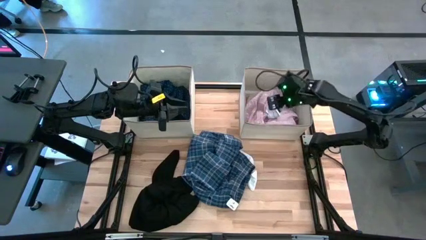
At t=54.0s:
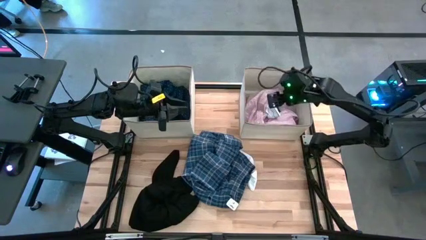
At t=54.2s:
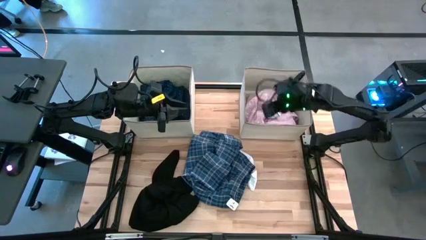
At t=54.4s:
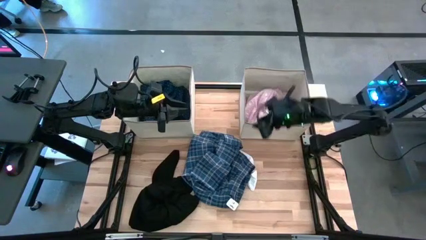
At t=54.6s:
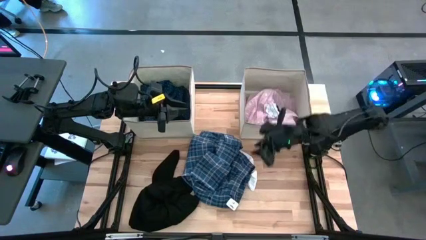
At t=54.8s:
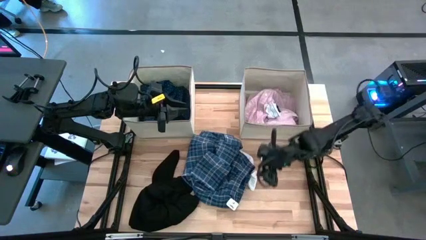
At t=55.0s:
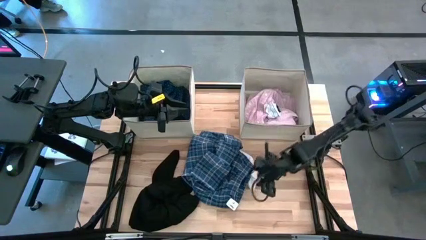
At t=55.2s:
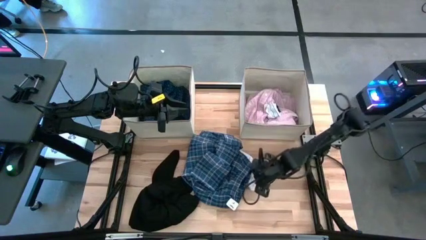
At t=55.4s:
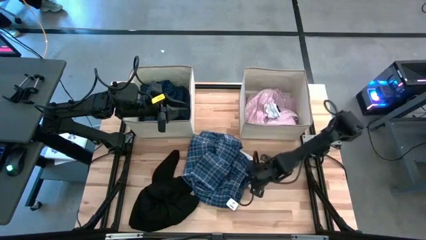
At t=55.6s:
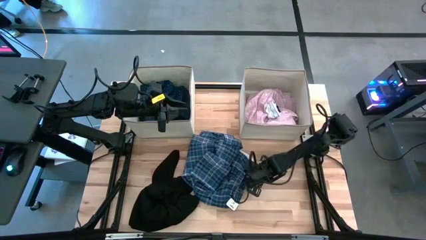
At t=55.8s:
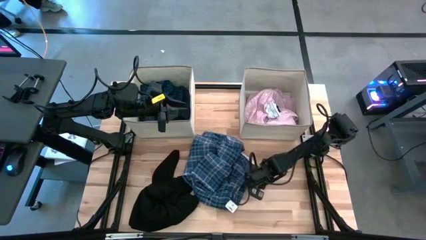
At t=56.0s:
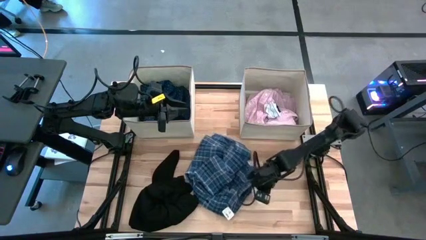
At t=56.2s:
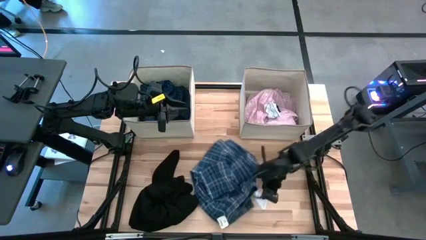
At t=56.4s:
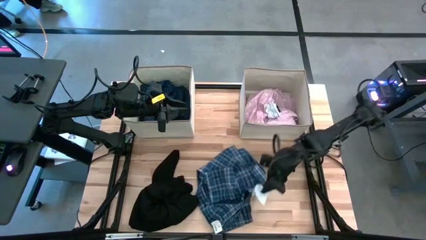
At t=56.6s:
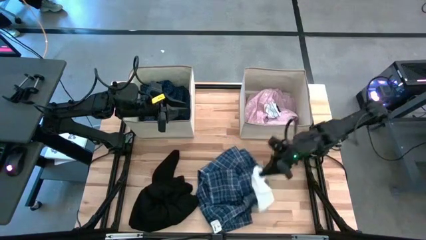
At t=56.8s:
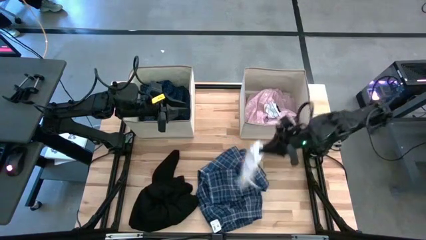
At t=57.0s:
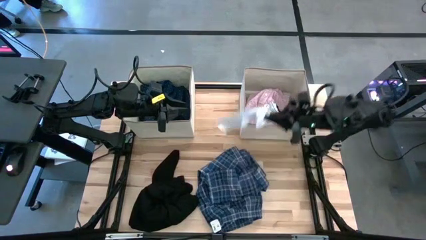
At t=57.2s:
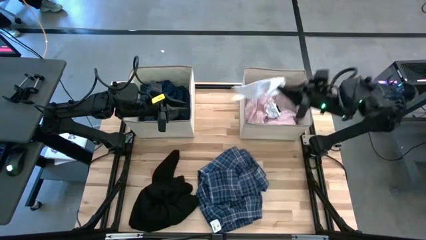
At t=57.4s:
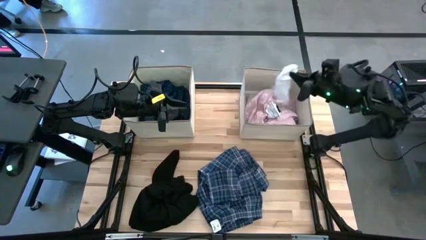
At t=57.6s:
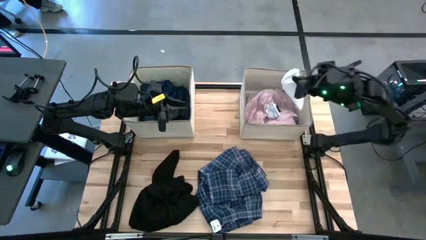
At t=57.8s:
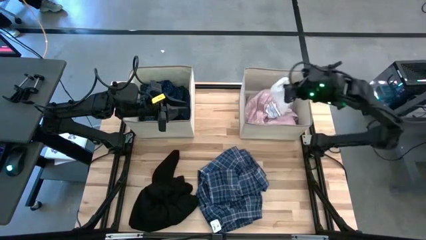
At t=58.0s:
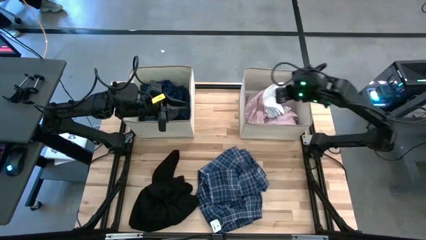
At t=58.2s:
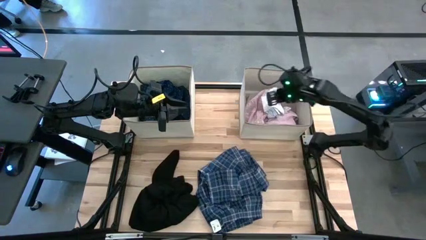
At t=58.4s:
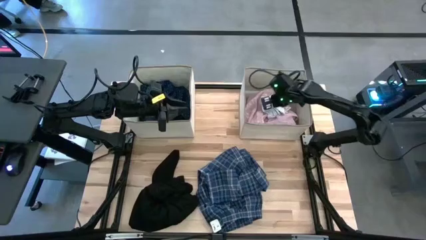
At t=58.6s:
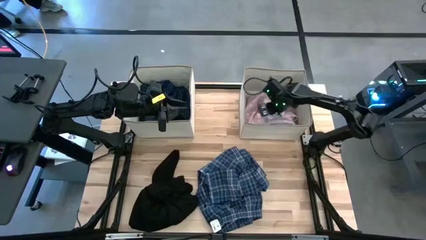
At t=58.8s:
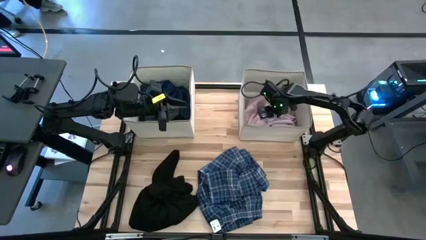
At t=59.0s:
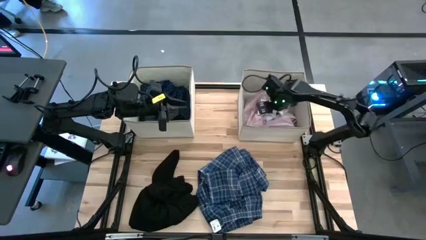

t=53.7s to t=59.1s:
Task: Sort clothes
Put the white sock into the right laundry bin

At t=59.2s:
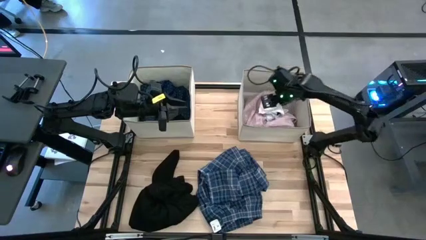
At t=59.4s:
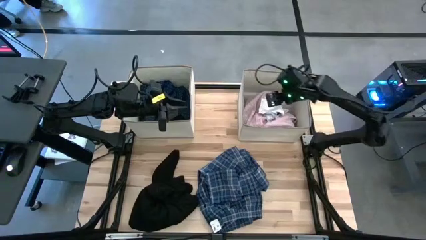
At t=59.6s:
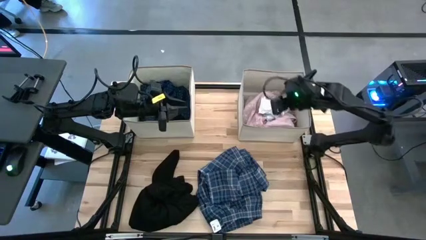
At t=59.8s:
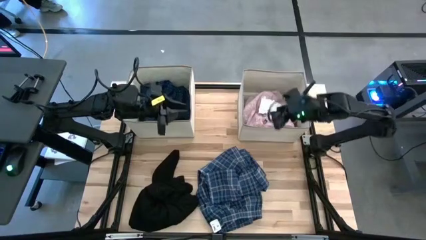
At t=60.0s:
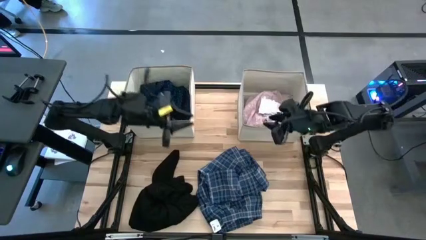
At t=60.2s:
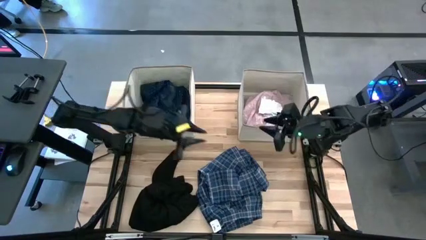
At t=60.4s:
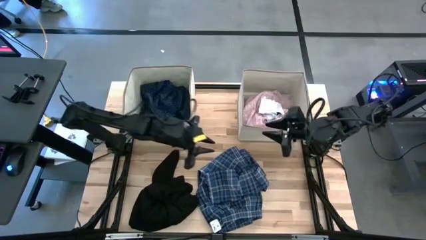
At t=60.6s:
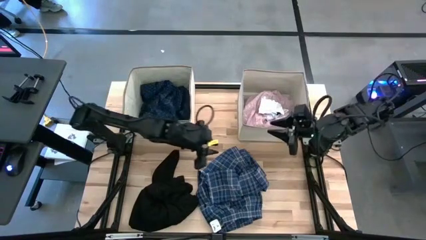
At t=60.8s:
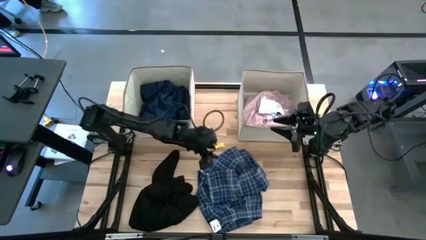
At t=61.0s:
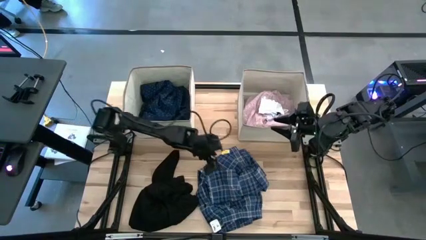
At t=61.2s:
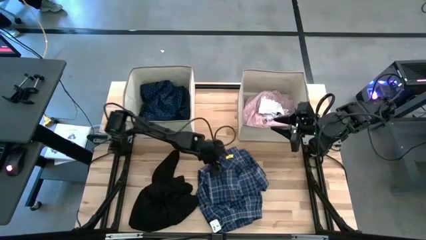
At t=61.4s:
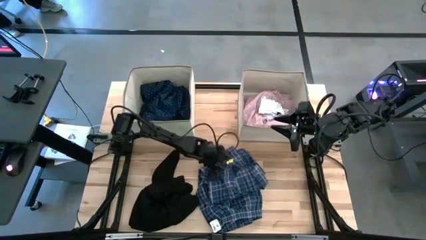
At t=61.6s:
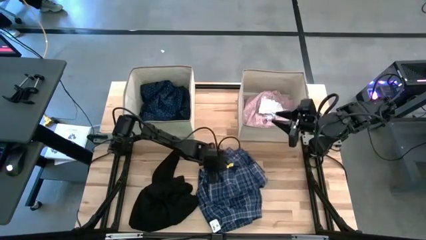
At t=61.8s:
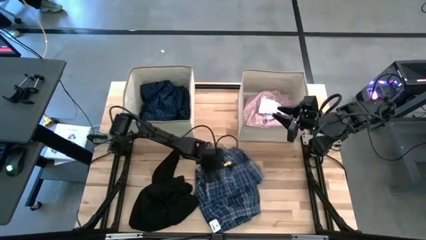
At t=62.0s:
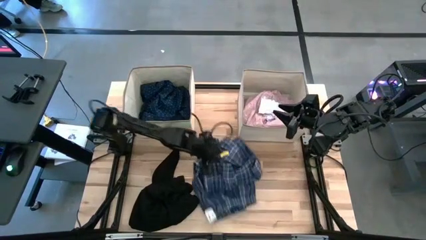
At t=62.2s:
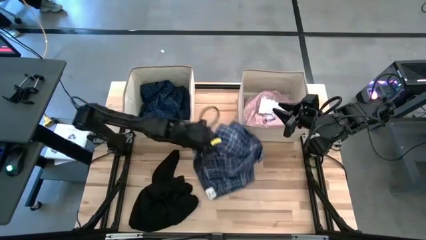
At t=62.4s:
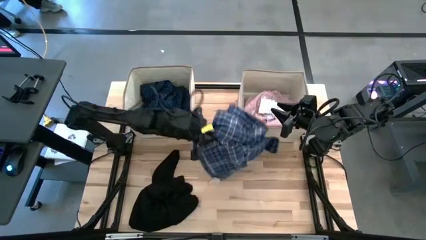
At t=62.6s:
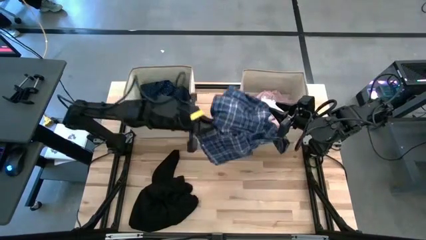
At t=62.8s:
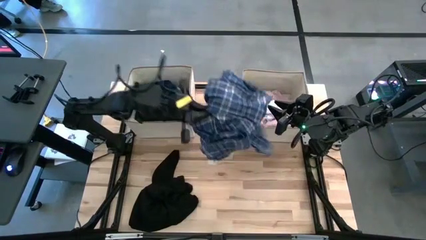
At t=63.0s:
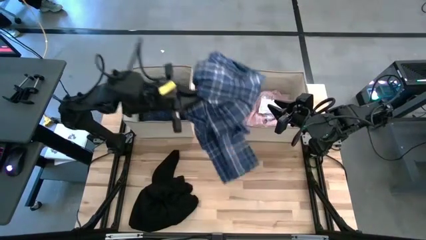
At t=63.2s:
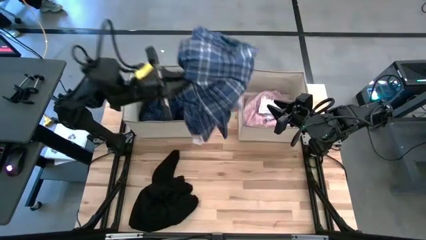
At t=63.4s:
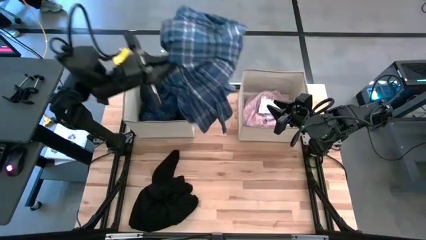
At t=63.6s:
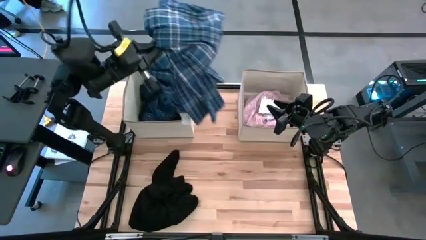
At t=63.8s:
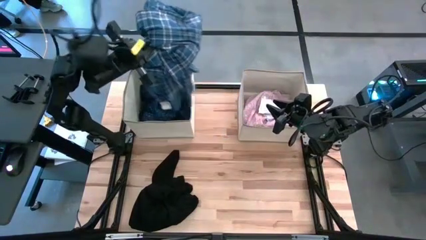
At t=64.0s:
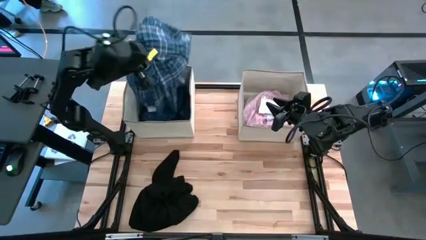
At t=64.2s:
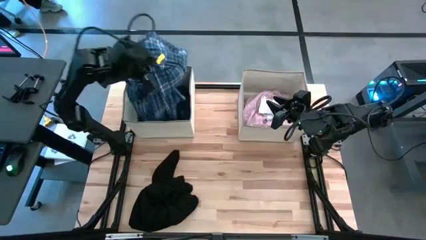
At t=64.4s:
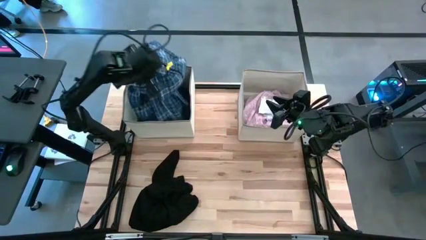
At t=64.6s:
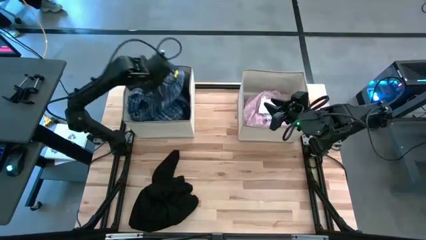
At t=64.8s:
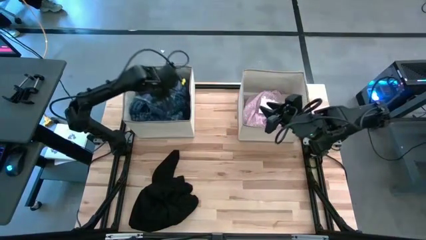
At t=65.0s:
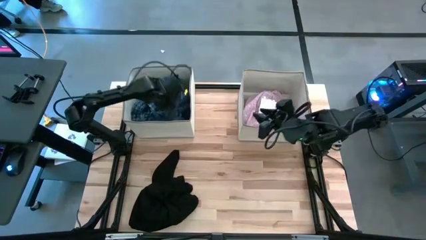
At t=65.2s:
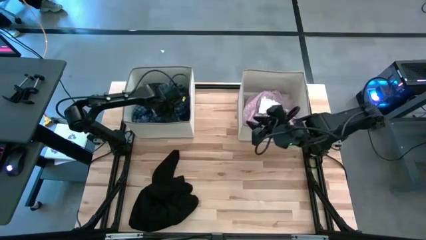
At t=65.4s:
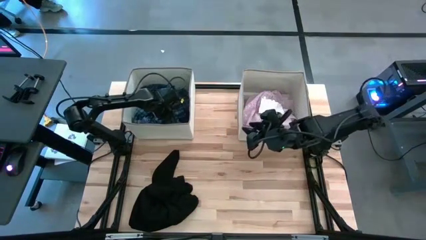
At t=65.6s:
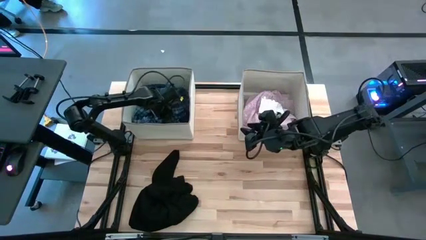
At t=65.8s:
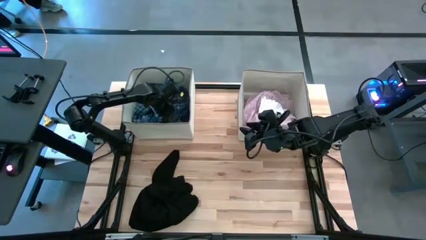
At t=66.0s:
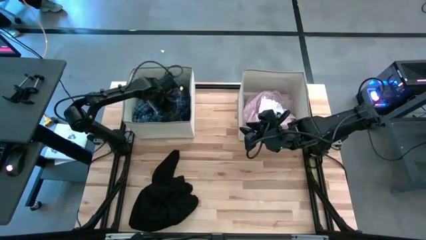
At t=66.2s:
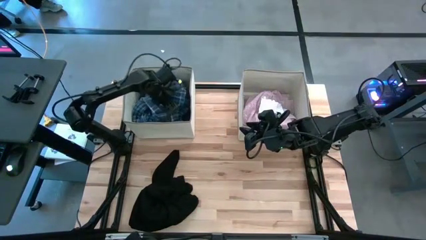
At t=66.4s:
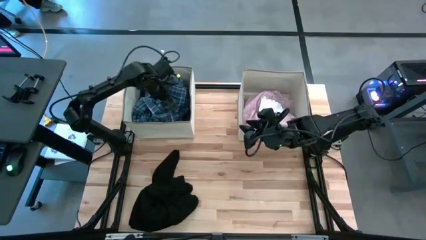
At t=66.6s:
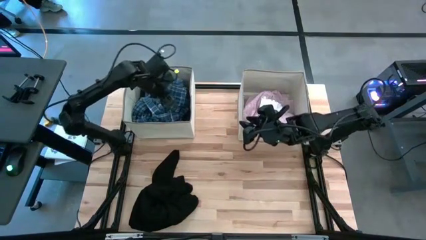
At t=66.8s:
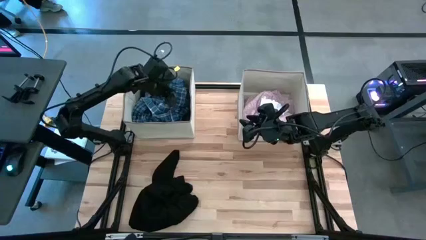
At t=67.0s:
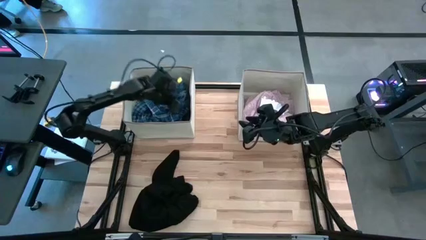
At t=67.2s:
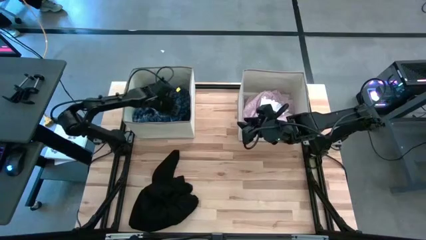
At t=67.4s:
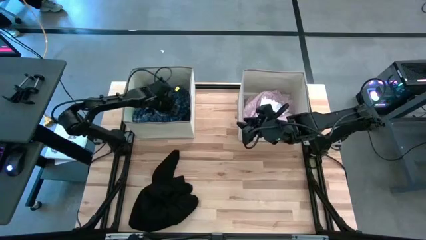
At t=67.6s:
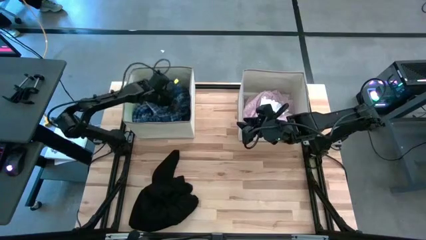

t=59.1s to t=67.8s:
Put the blue pants into the left laundry bin

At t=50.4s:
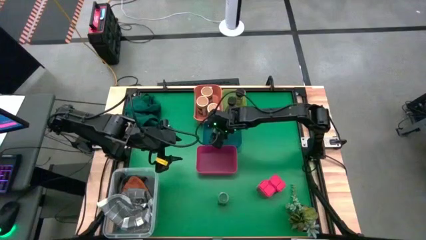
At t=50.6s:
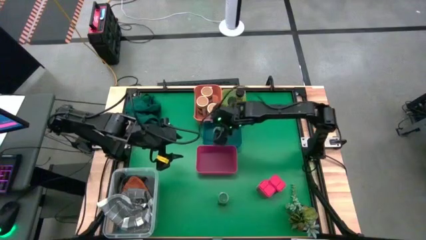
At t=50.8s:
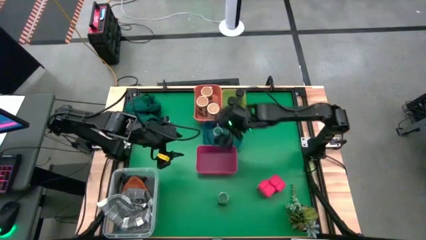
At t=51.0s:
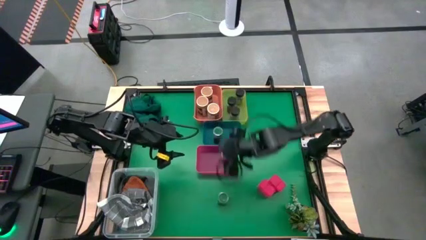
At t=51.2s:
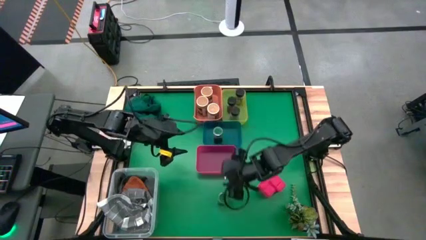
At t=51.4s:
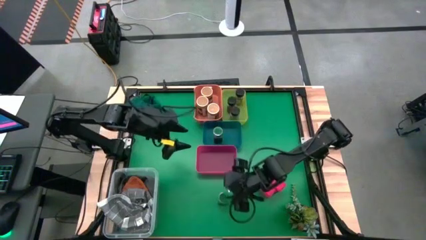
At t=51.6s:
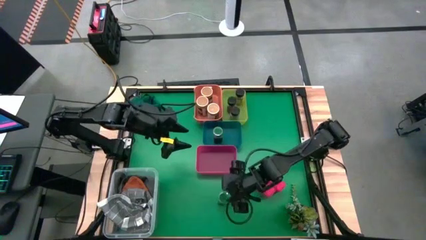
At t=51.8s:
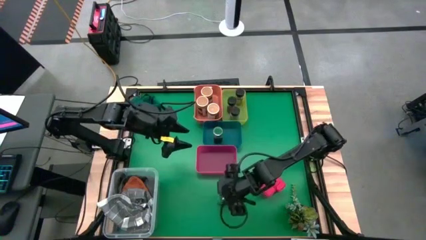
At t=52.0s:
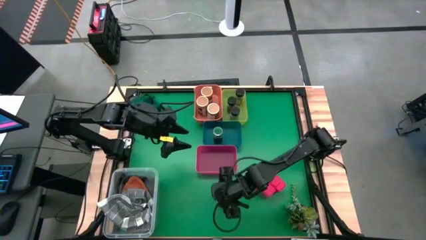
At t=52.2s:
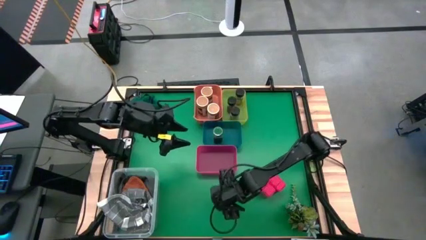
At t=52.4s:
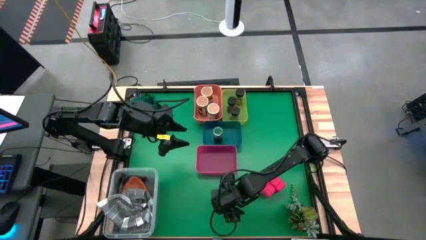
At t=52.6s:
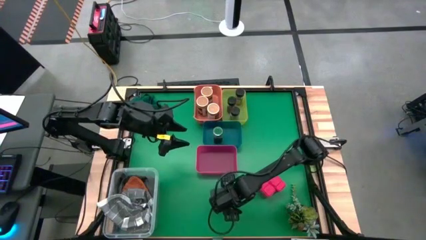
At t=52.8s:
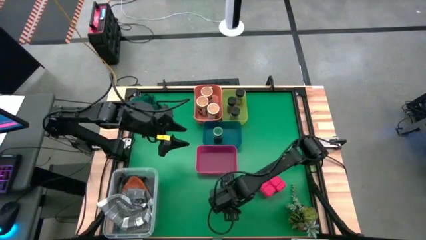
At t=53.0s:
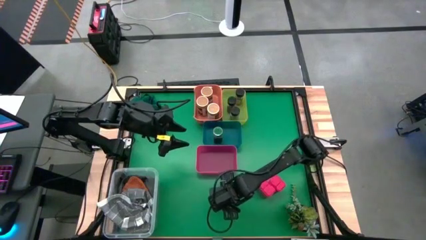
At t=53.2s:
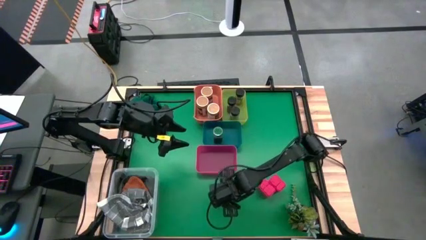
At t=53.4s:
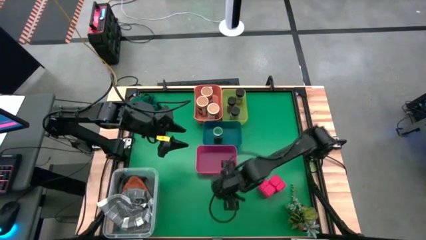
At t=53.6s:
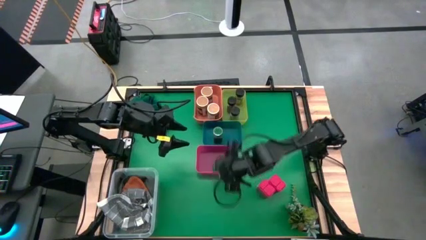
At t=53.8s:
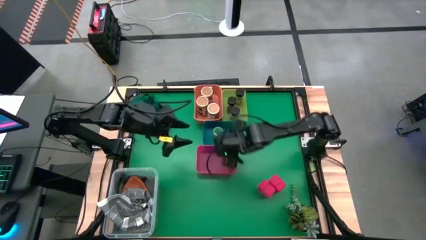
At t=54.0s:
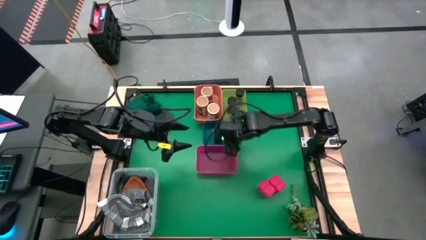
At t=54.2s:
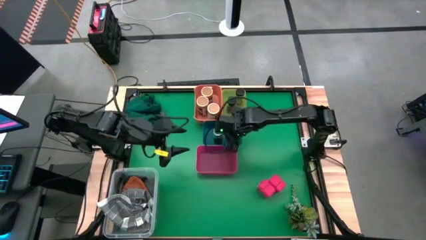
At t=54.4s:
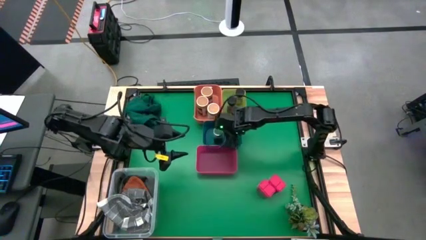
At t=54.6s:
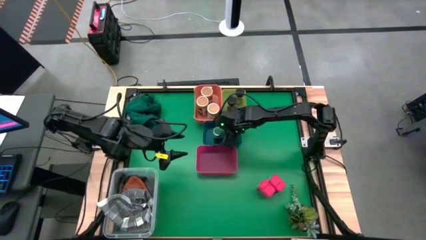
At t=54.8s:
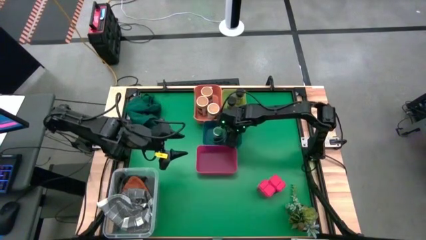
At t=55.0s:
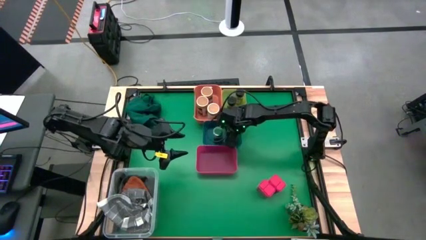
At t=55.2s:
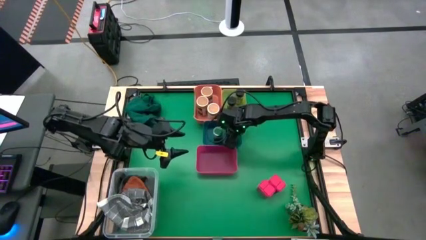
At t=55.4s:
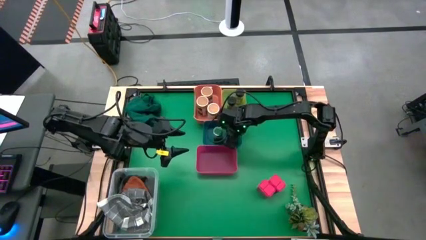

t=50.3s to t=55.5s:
Task: Sort spices by type
Put the green seasoning bottle into the blue bin
